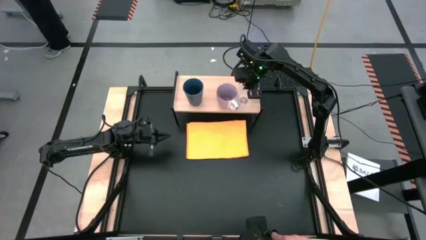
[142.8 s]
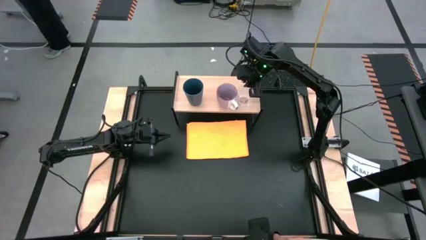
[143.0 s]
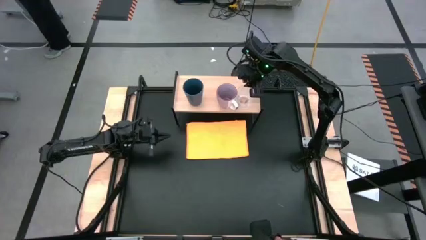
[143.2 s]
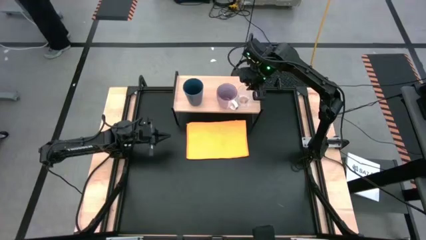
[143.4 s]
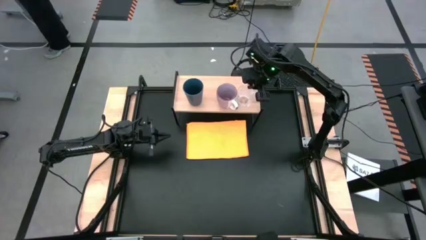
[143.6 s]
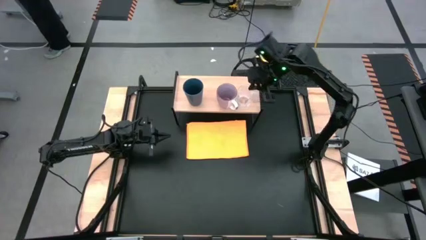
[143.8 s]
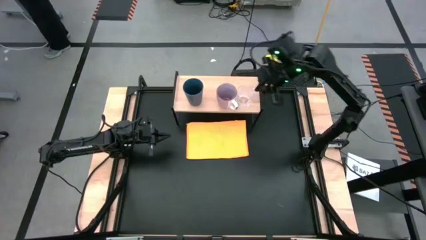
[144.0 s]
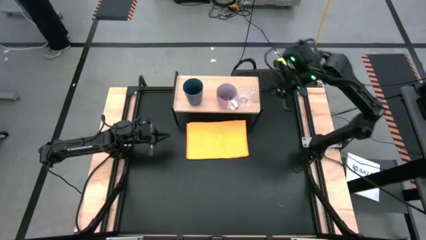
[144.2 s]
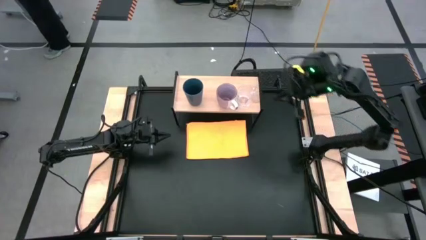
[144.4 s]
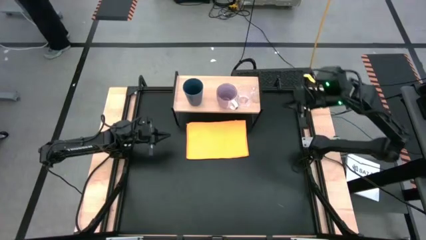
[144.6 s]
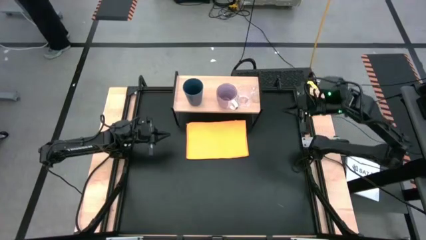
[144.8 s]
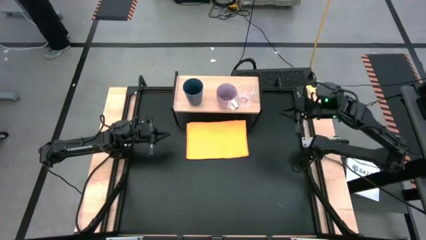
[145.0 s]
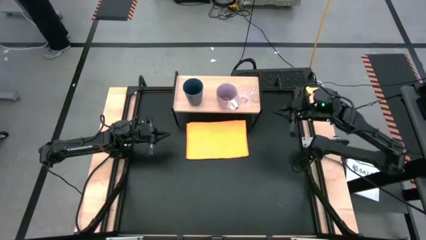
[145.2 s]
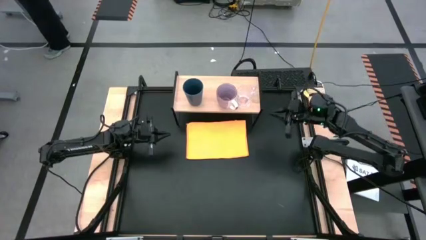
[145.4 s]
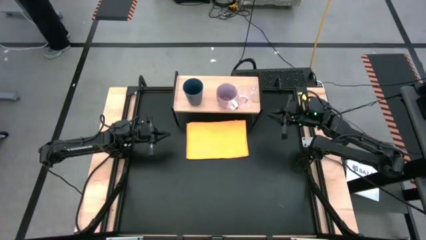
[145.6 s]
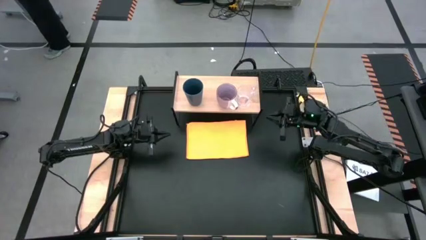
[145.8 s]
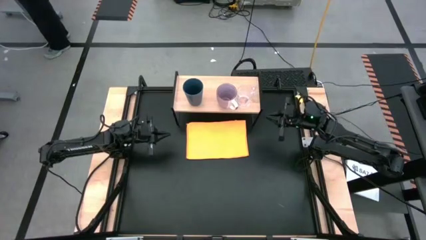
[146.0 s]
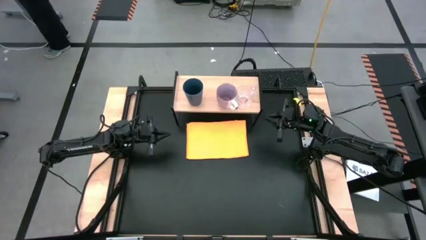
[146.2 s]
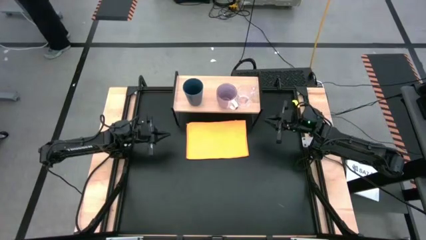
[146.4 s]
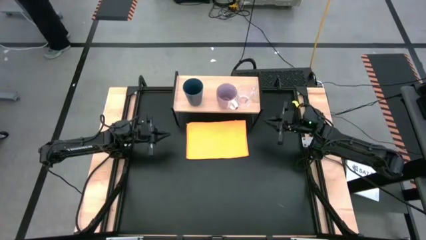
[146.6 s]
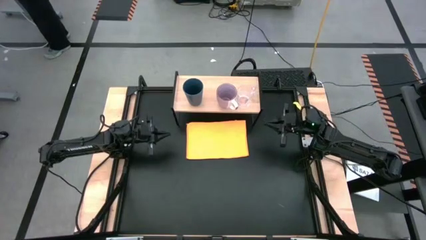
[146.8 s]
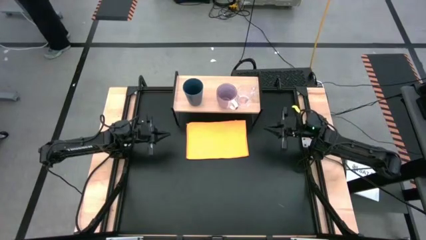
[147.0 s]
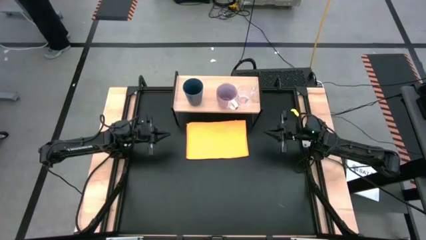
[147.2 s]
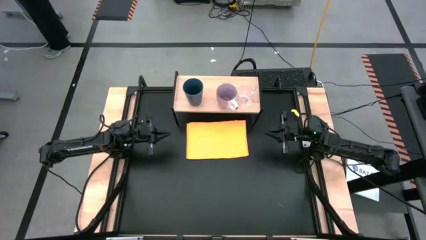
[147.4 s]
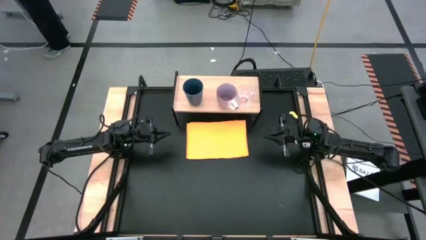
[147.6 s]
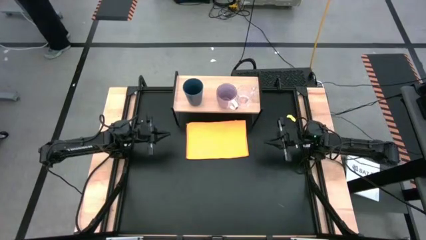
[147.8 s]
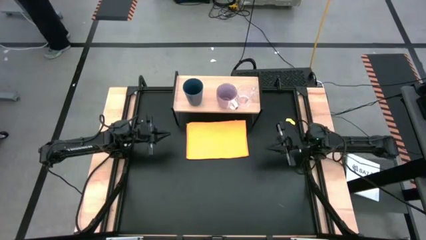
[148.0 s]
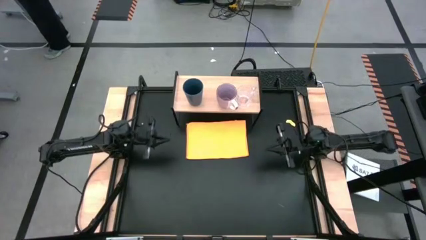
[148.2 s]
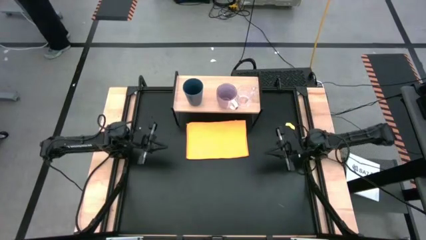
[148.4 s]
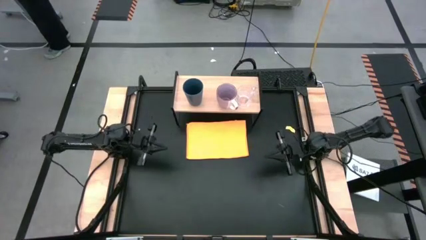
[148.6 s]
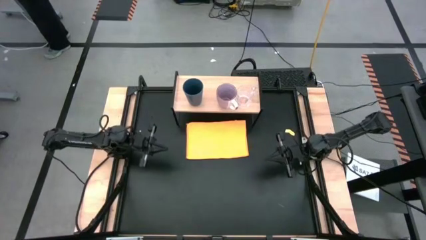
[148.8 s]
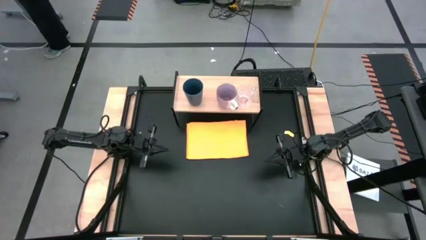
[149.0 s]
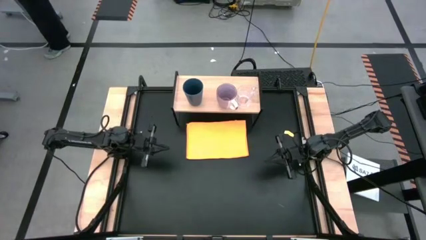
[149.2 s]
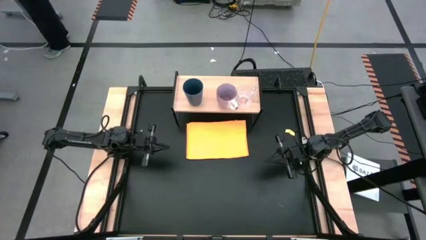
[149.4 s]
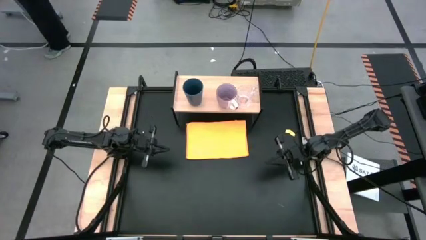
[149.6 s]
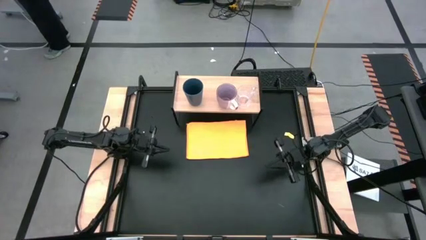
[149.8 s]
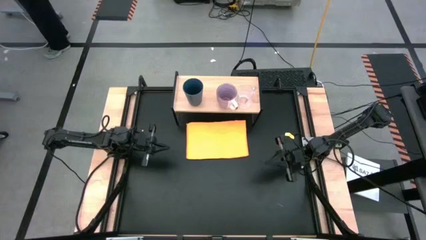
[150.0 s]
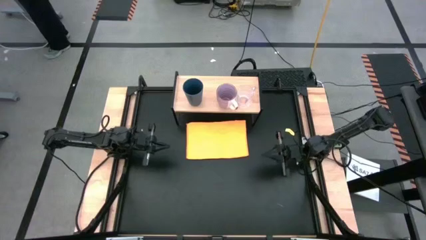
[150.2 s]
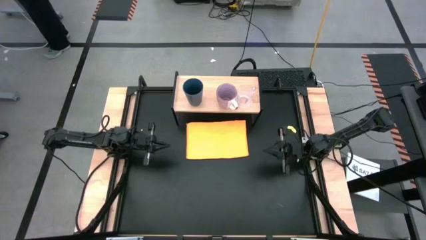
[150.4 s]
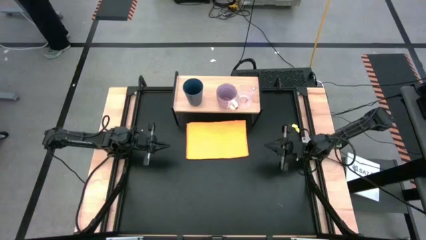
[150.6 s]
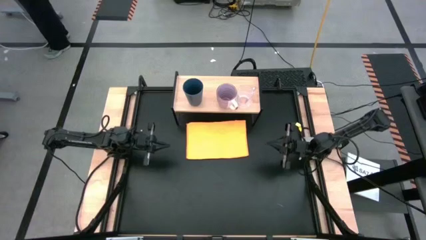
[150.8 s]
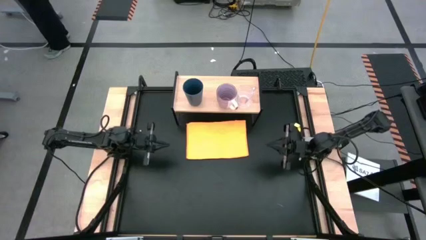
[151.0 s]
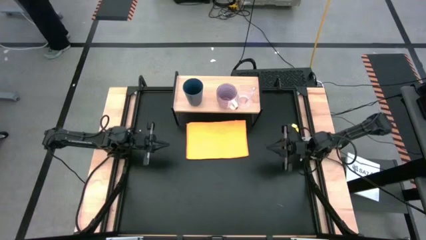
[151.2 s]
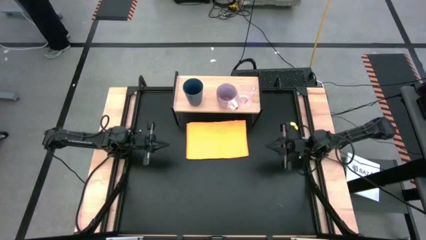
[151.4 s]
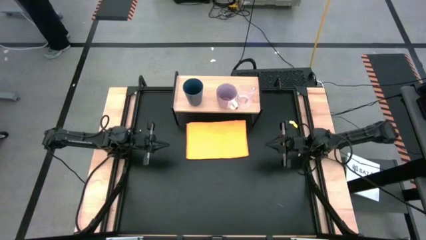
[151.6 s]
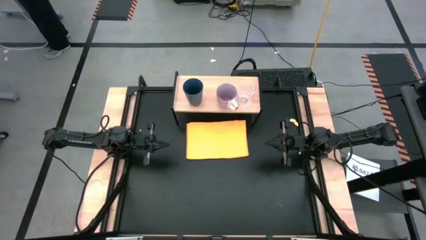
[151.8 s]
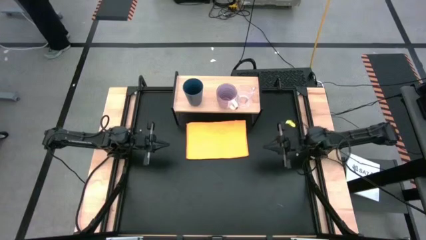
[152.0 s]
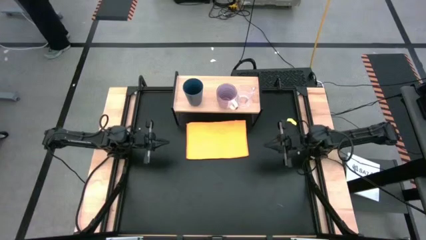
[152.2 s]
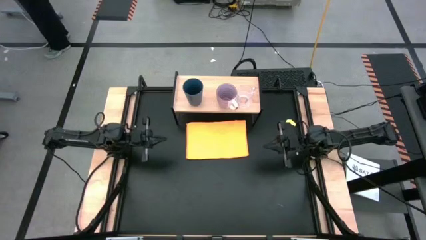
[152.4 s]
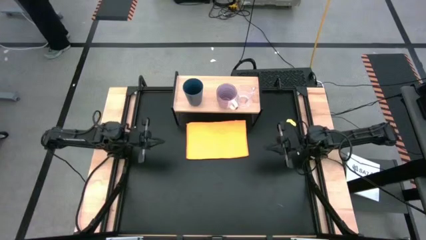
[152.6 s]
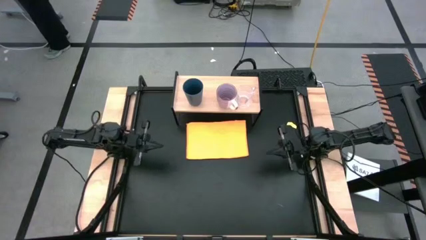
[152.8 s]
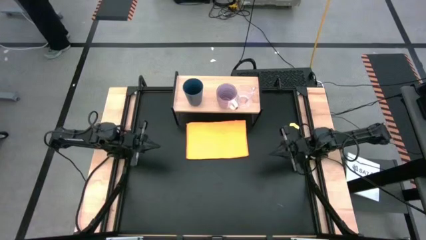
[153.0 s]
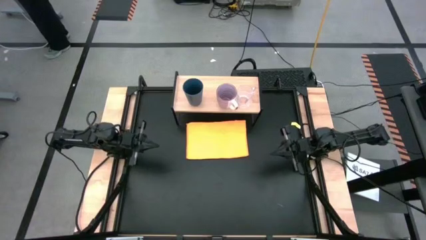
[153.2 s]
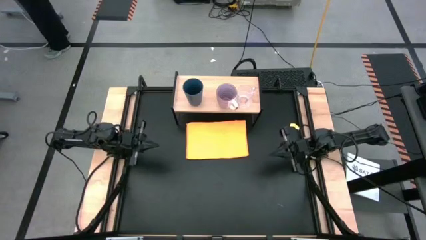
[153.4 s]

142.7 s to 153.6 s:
Task: Stack small to large cups/mugs on shelf
Return to Home Position

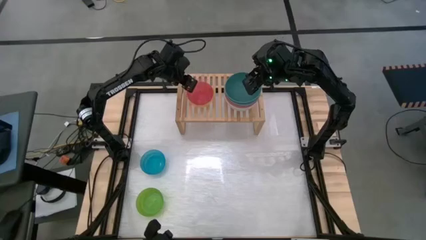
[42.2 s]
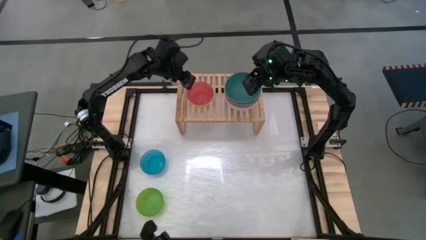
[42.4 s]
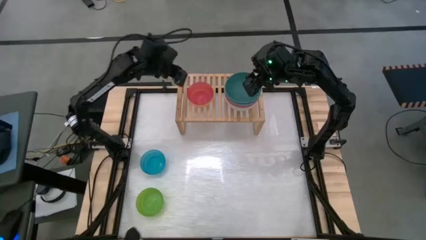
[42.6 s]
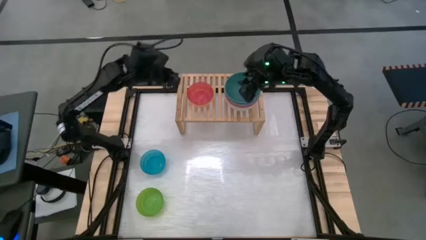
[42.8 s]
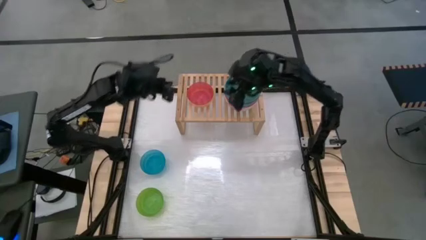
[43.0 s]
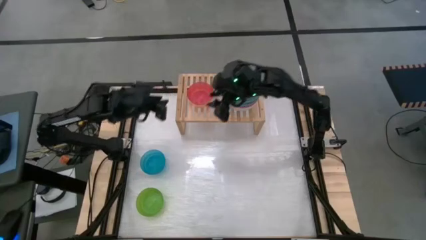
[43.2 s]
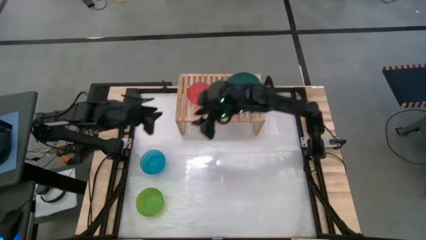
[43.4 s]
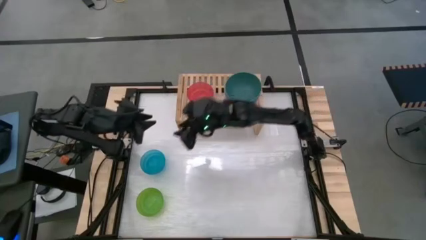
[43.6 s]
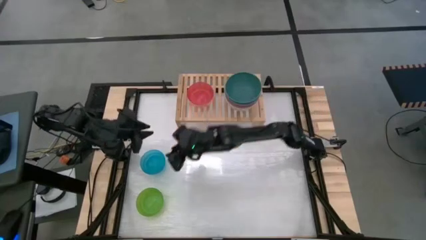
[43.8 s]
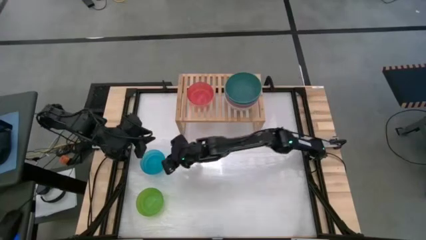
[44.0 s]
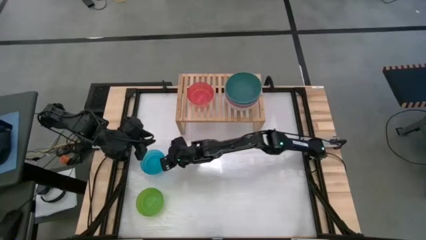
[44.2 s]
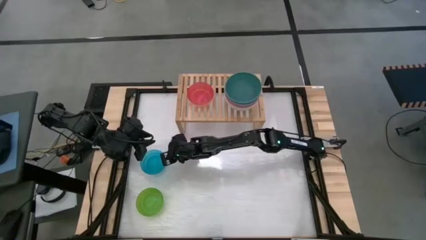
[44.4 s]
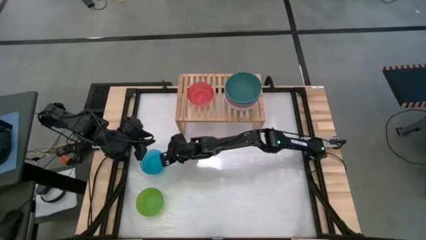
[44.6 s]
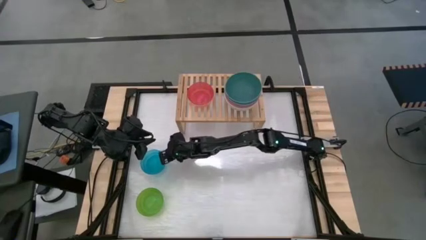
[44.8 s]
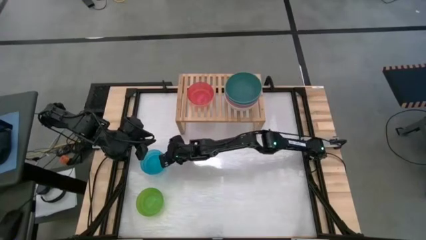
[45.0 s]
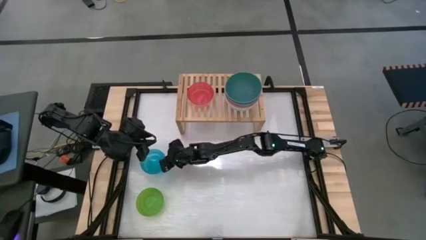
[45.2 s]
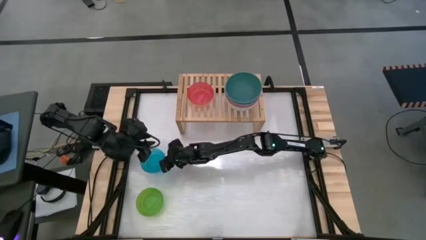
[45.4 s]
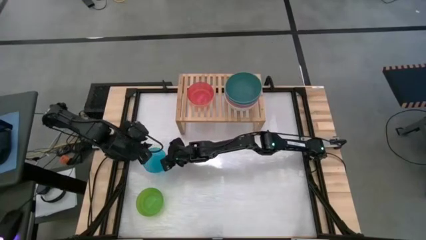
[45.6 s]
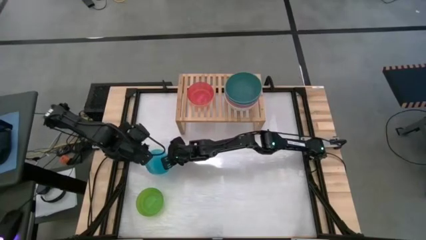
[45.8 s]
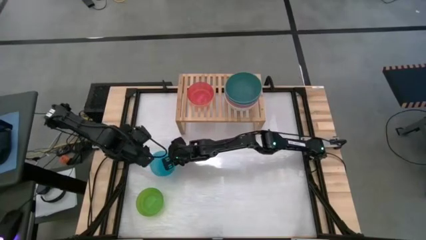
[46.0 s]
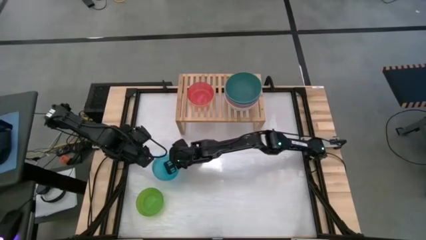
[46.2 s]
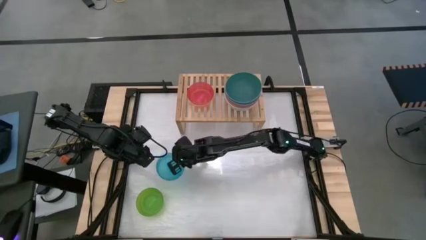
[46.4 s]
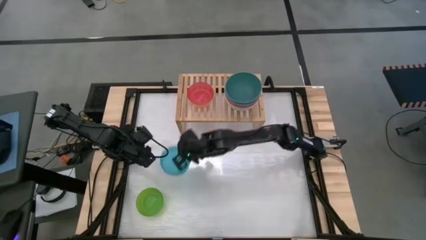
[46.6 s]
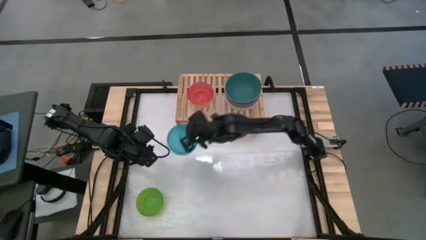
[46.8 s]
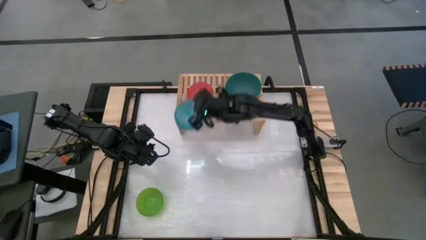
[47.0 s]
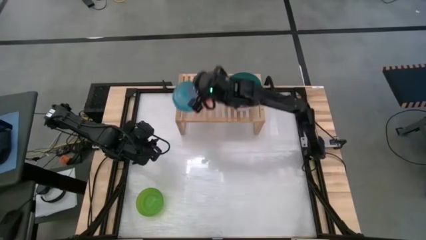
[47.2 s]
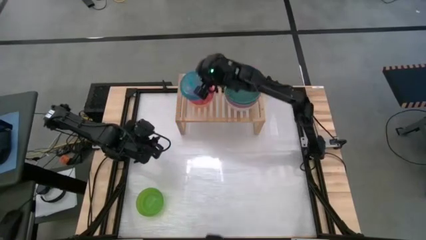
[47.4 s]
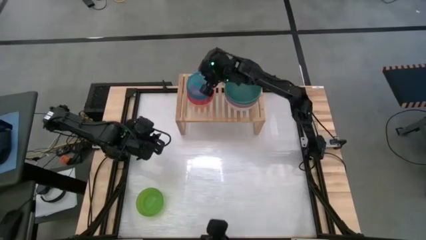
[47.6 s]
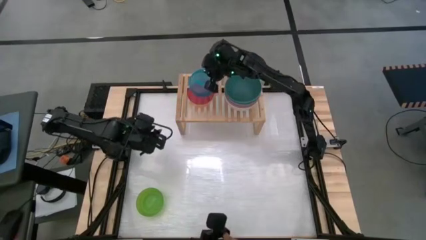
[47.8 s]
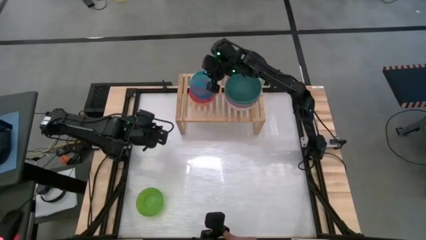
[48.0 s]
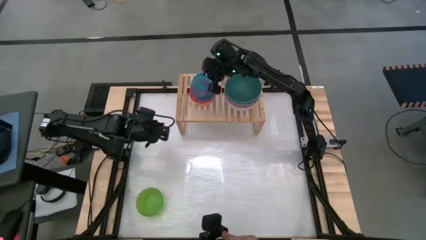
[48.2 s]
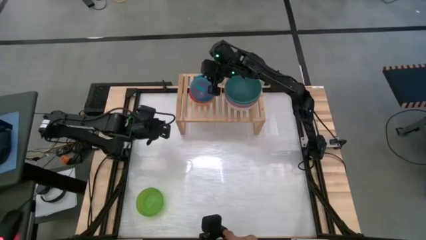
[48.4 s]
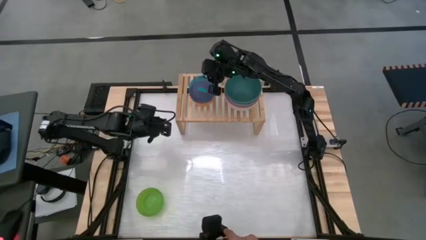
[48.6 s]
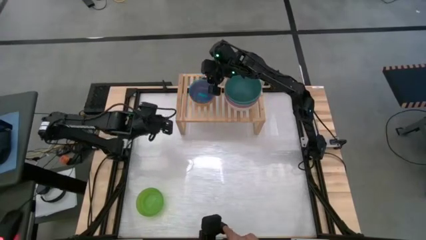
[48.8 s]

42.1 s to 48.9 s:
Task: Place and stack bowls onto a shelf
Stack the small light blue bowl on the stack small bowls on the shelf
